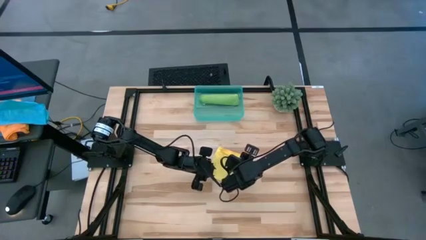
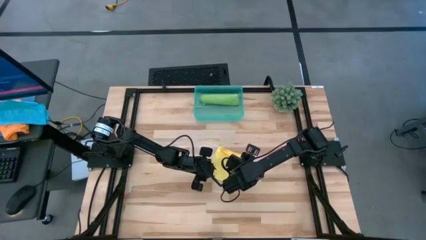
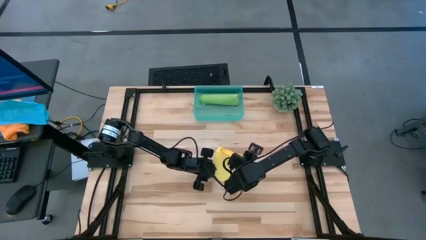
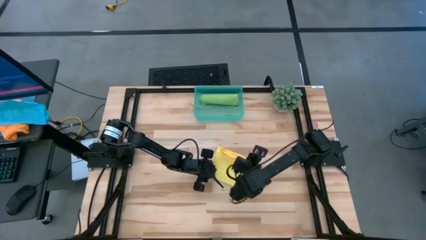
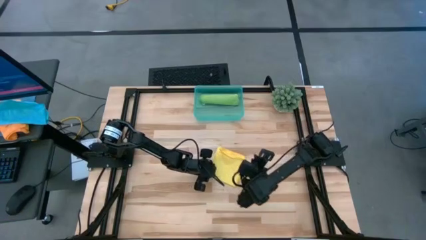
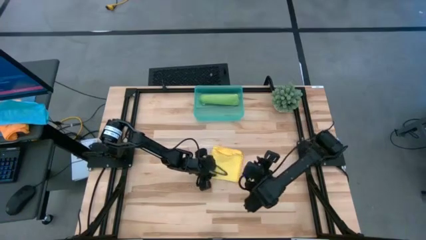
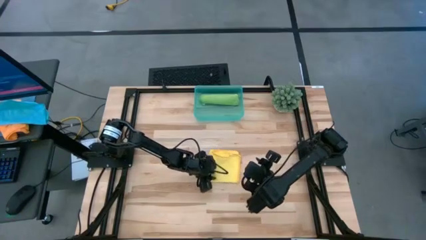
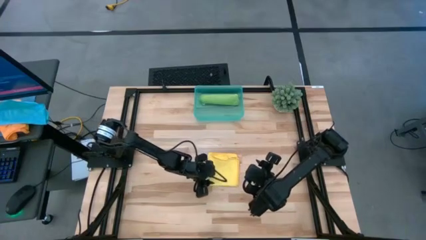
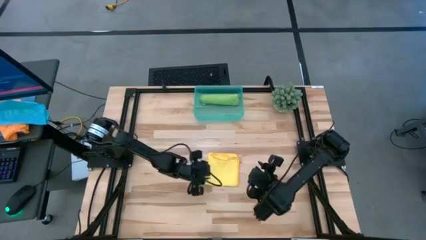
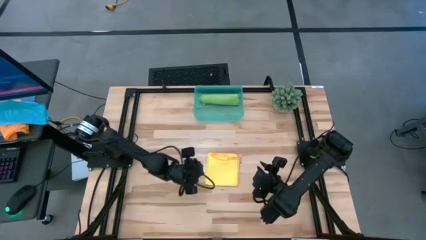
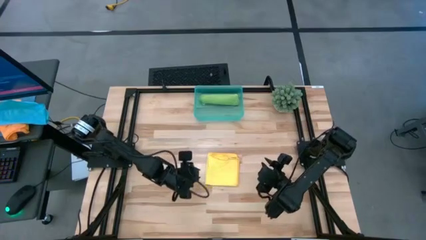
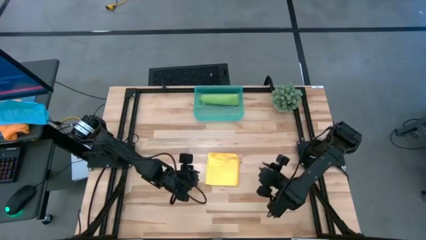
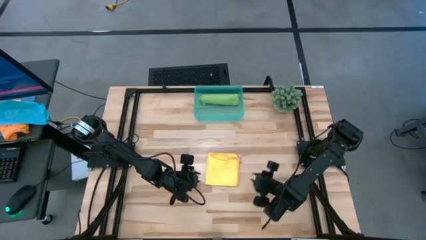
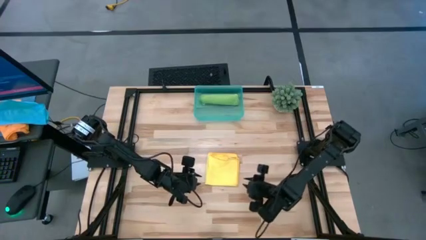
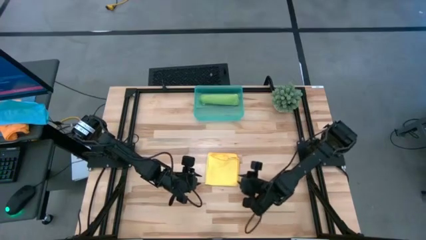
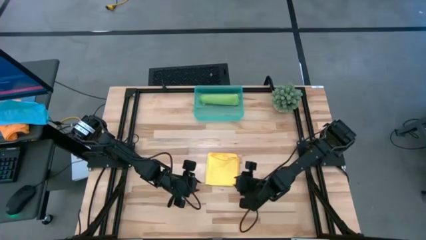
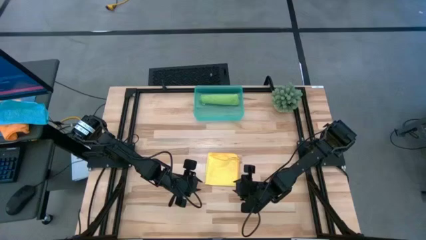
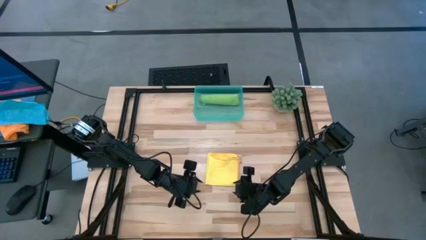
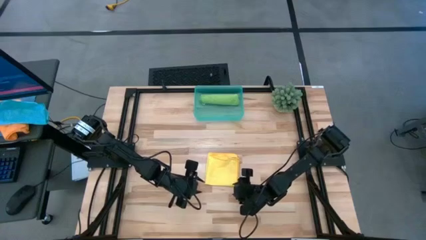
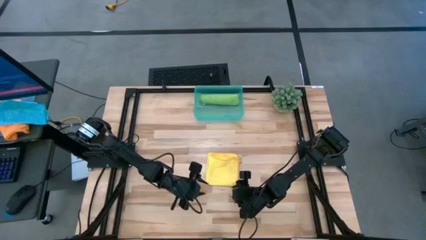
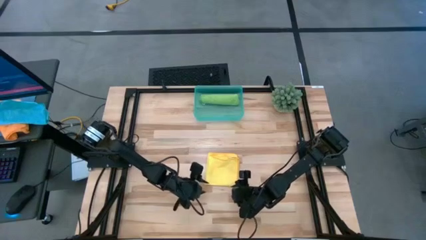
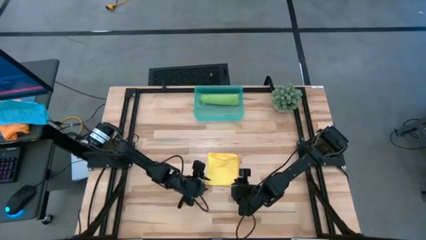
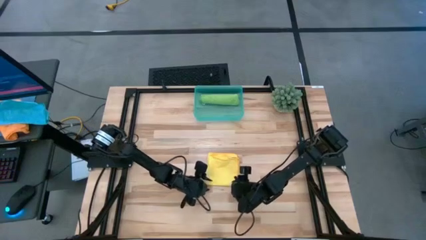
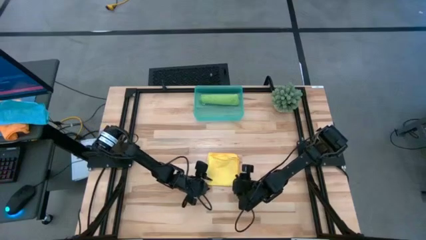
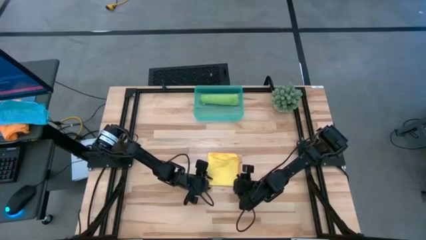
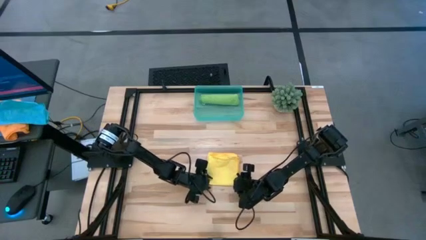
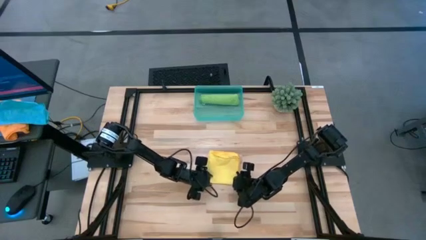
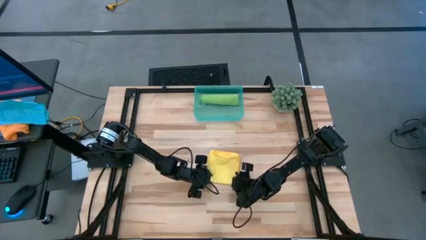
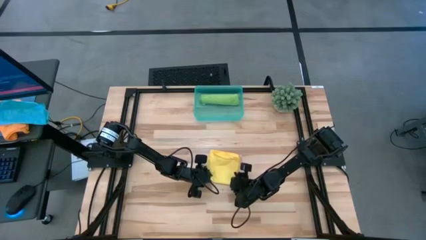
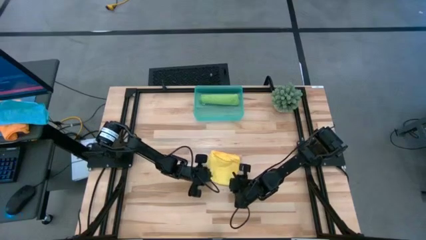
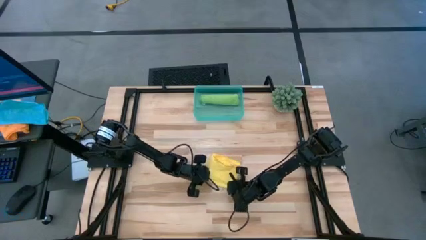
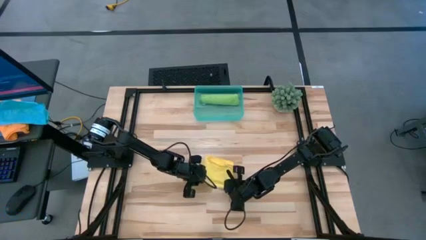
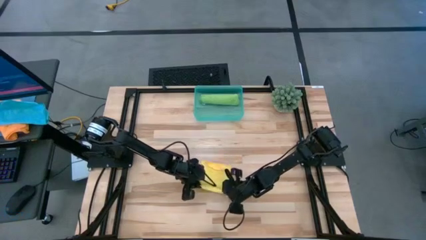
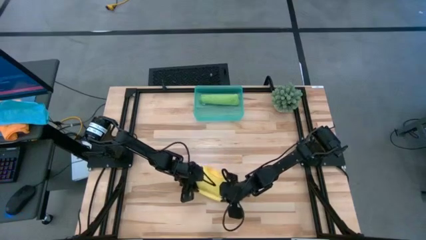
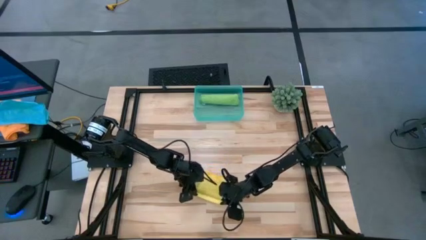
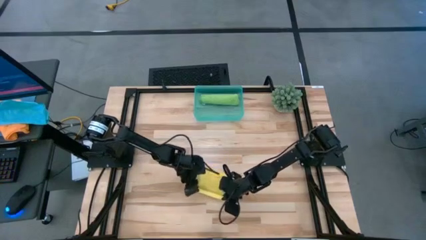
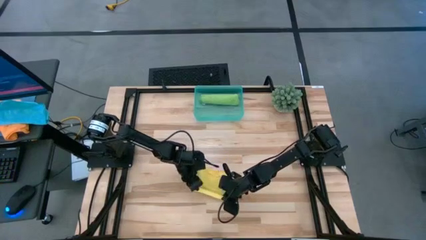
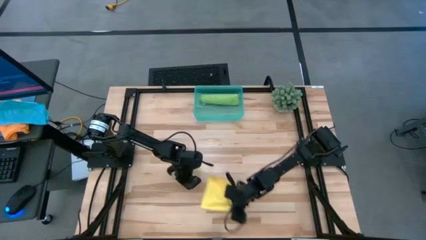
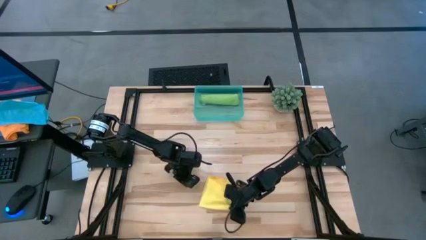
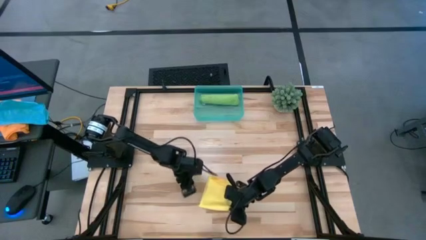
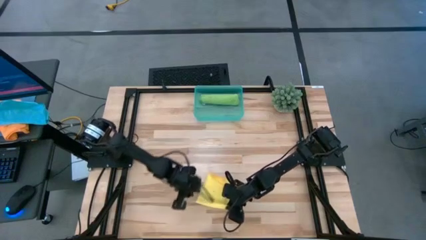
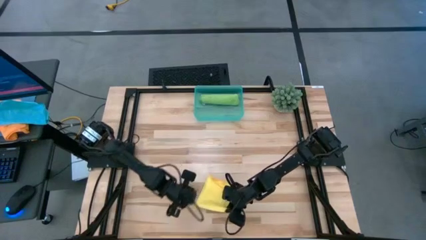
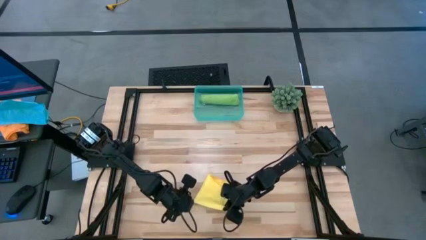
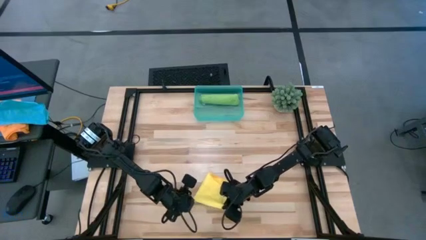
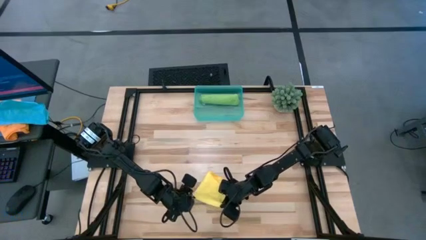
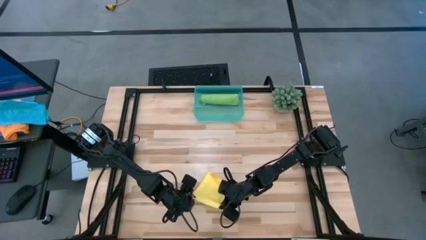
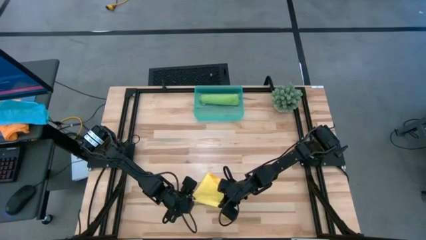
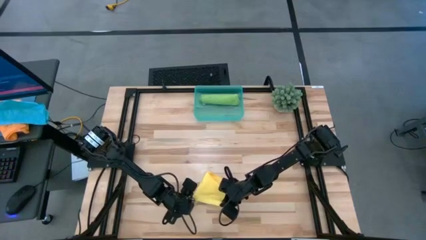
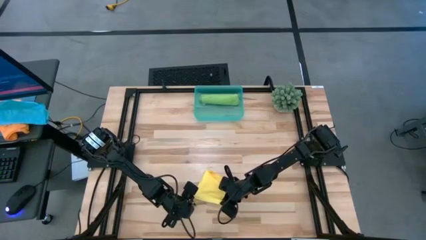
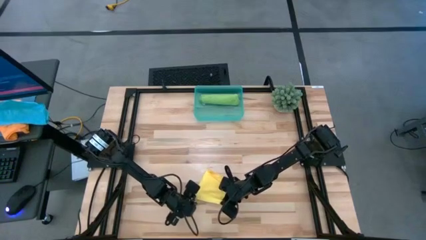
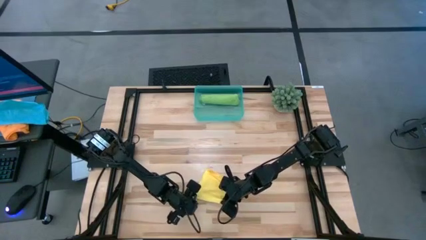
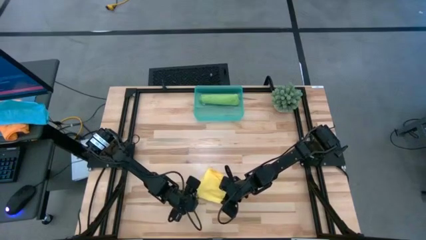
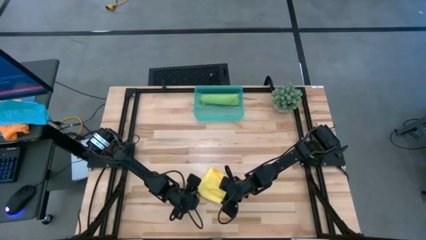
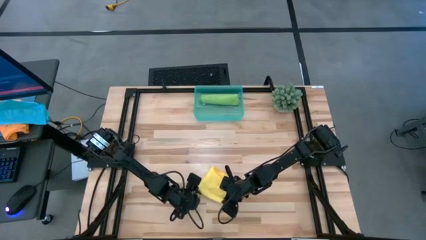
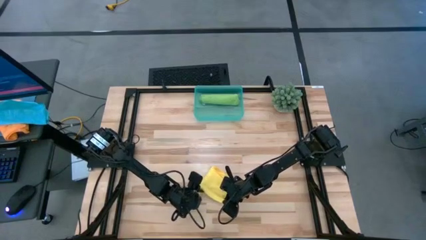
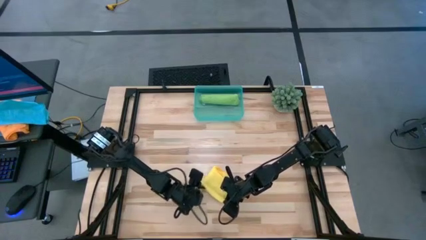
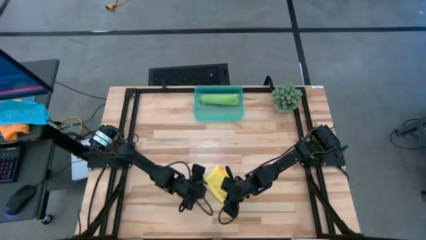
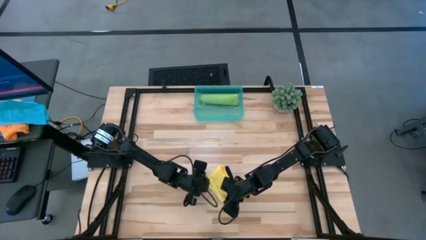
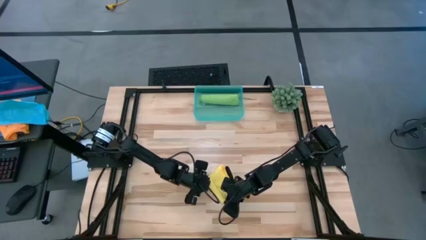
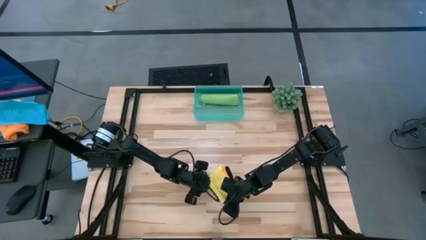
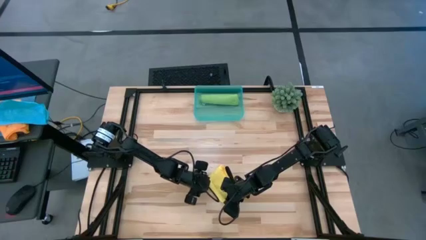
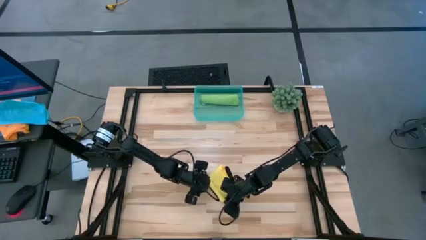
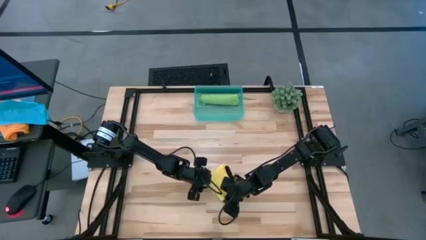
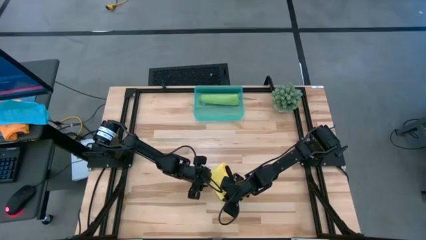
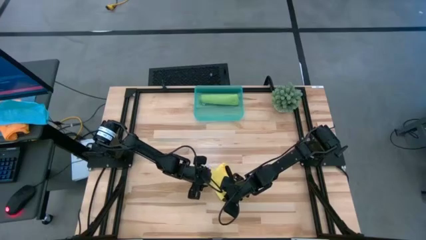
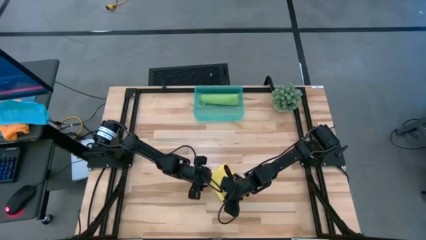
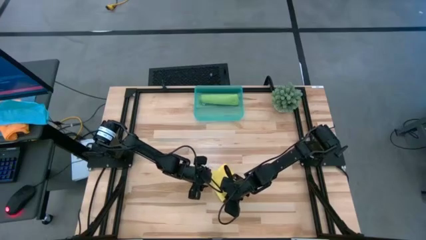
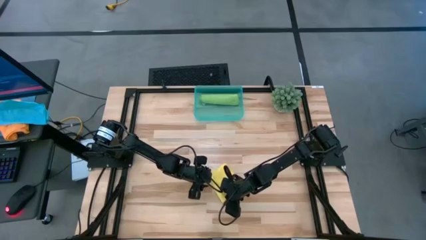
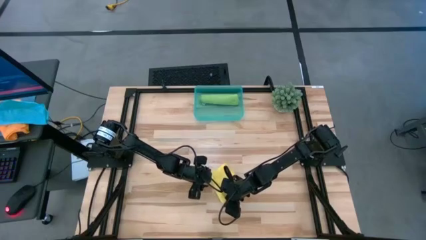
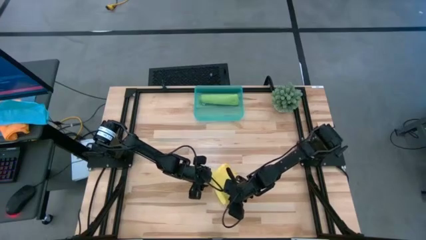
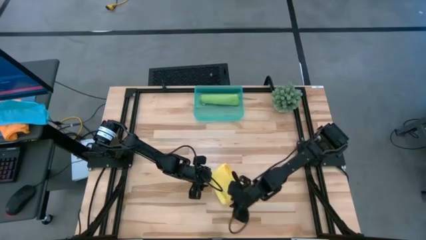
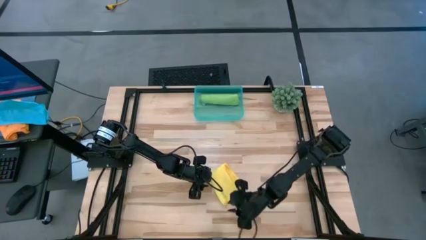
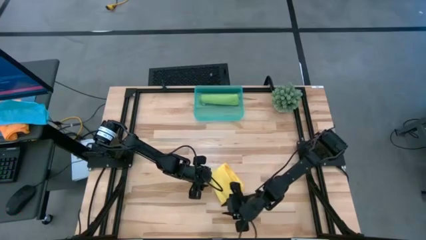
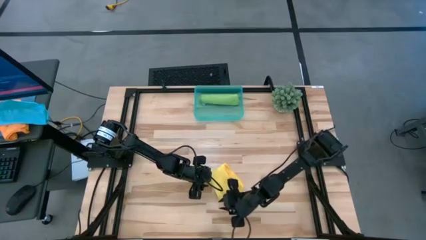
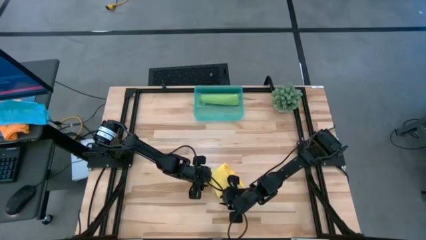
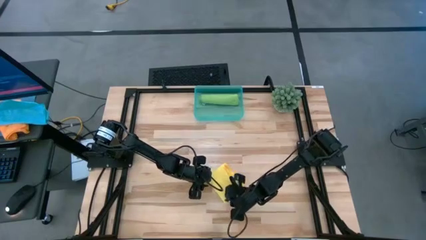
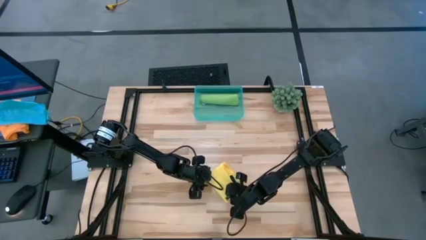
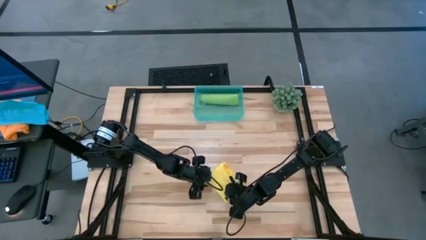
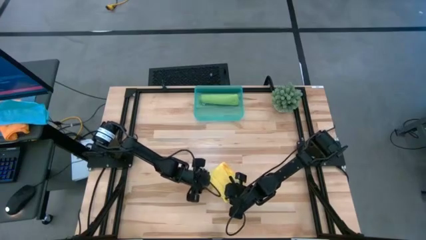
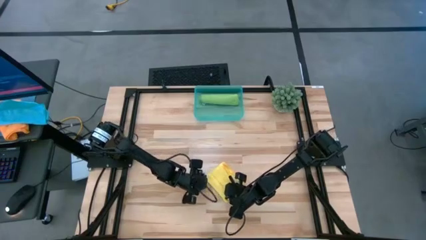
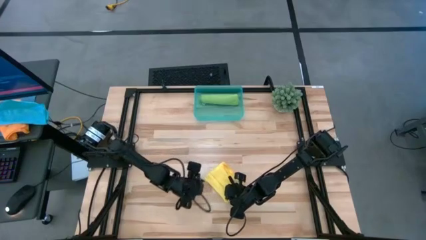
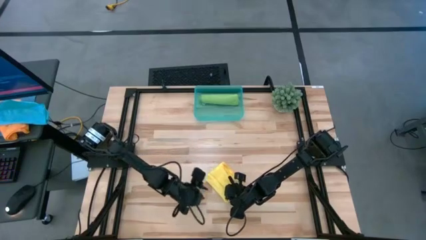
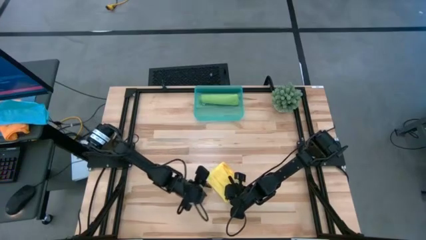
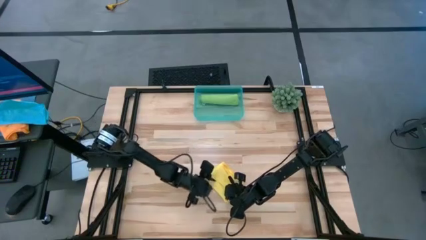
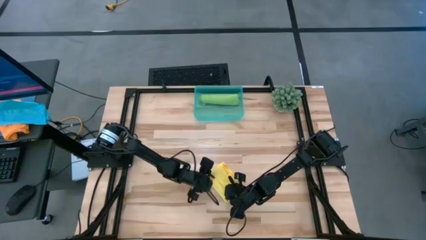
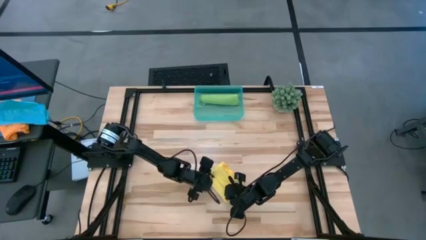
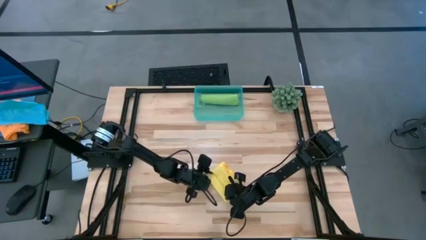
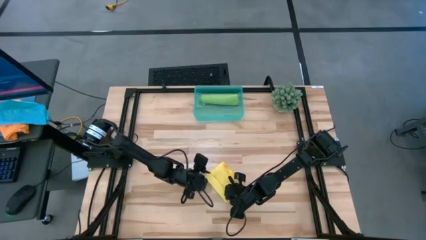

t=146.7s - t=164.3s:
Task: Roll microfiber towels into tight, uniform cylinder then place into a basket
Roll the yellow towel
